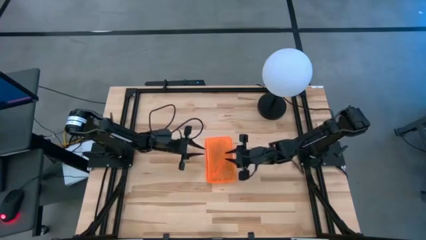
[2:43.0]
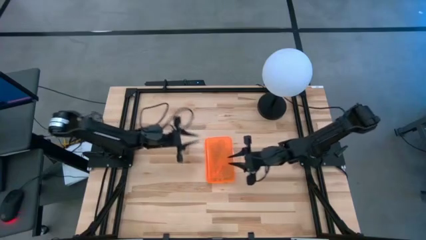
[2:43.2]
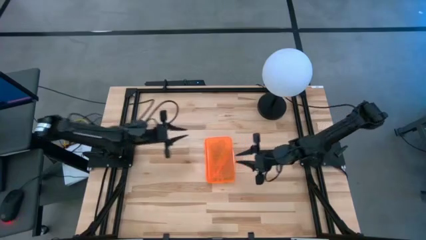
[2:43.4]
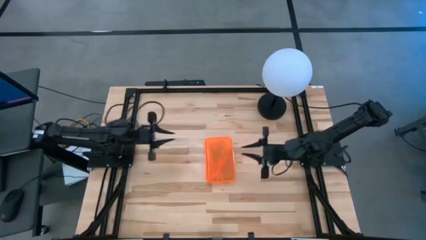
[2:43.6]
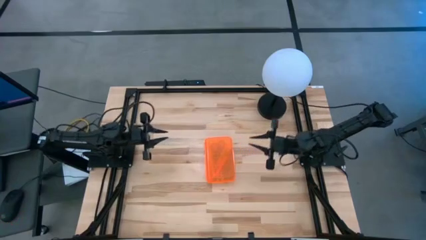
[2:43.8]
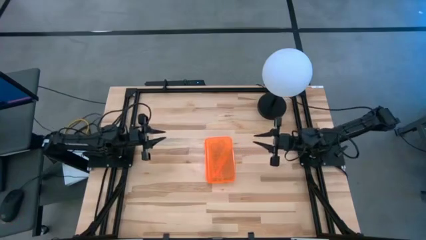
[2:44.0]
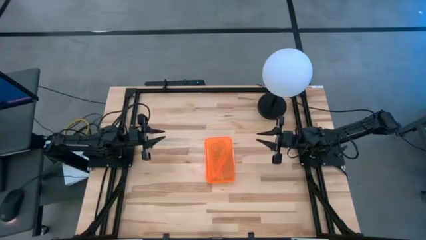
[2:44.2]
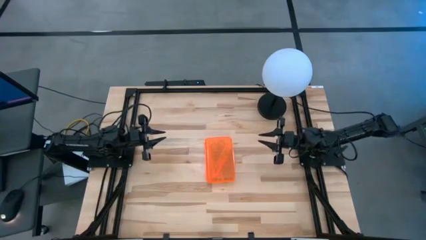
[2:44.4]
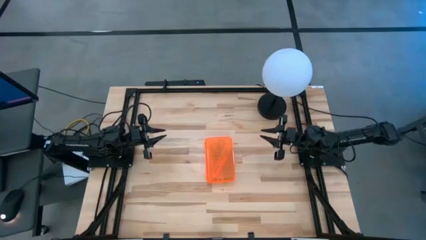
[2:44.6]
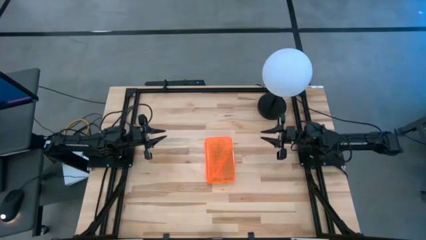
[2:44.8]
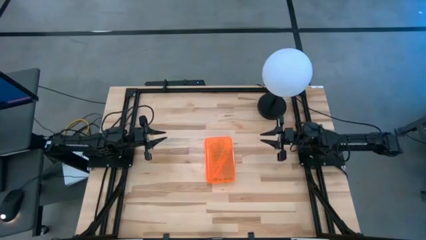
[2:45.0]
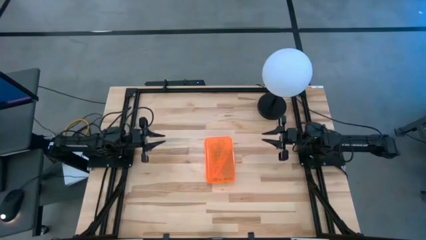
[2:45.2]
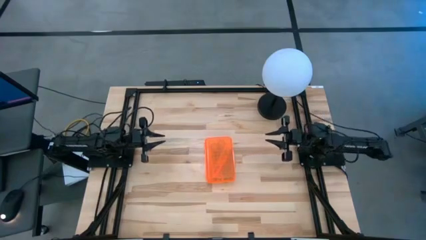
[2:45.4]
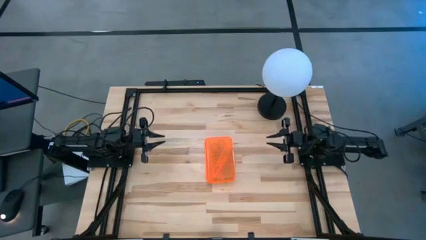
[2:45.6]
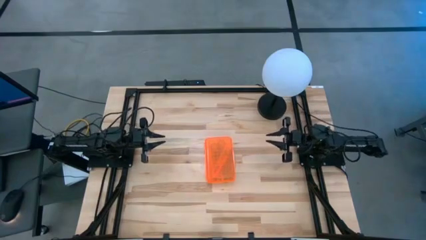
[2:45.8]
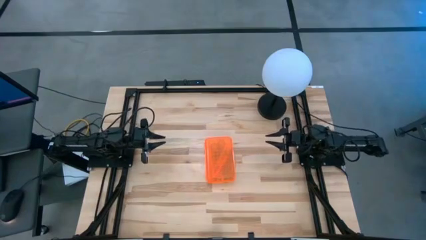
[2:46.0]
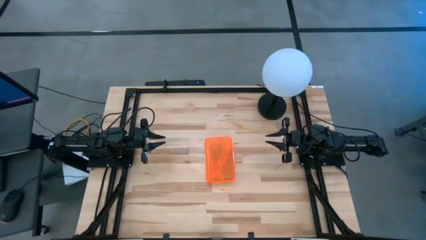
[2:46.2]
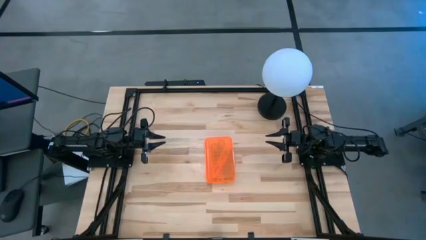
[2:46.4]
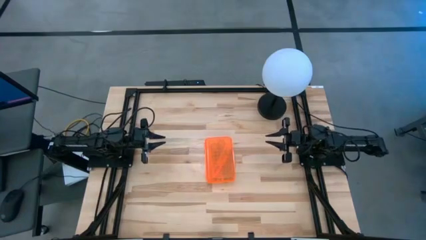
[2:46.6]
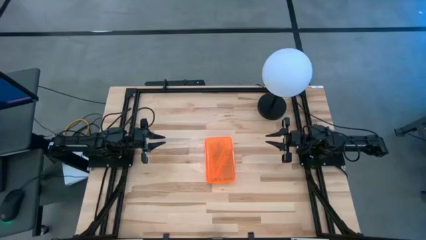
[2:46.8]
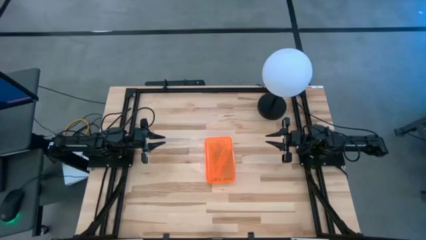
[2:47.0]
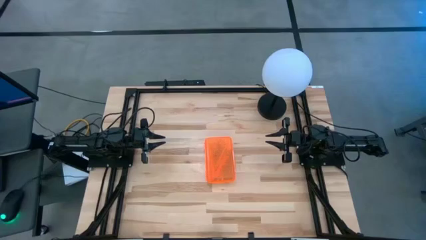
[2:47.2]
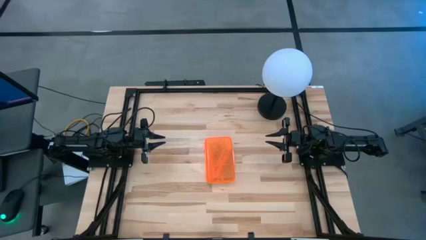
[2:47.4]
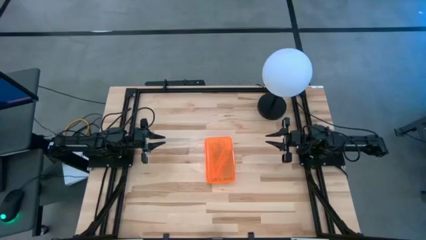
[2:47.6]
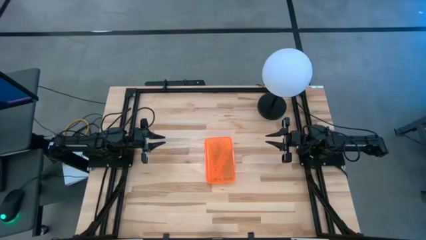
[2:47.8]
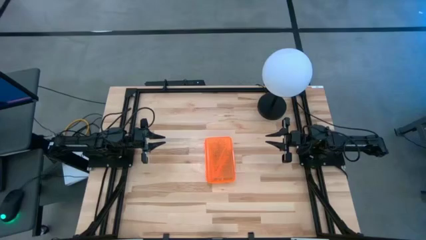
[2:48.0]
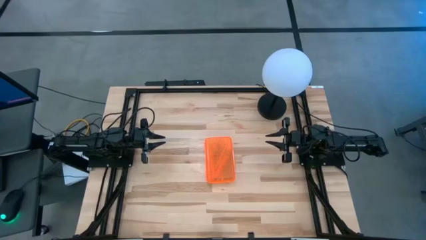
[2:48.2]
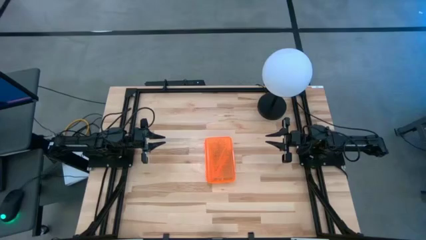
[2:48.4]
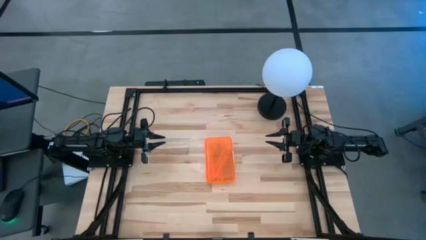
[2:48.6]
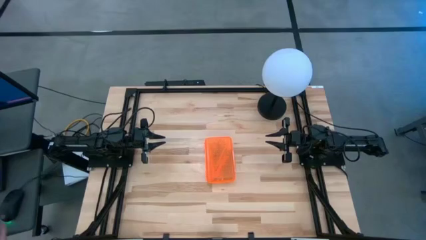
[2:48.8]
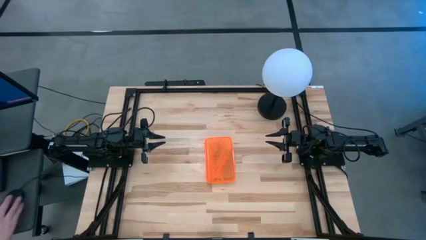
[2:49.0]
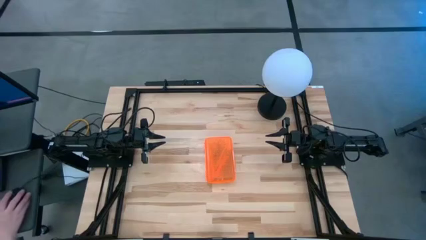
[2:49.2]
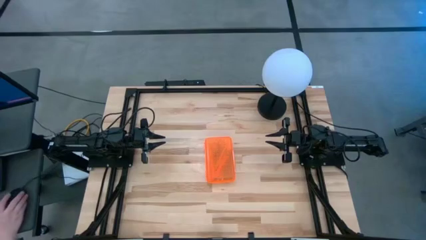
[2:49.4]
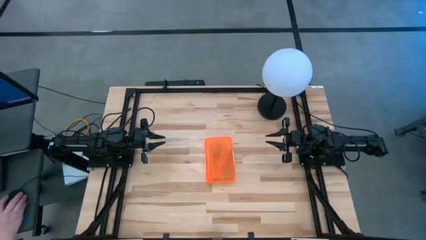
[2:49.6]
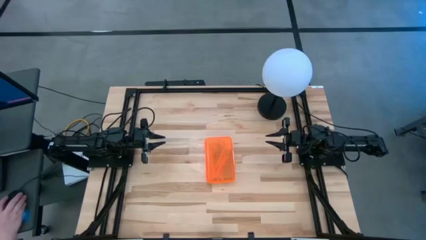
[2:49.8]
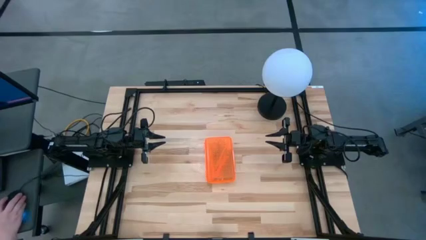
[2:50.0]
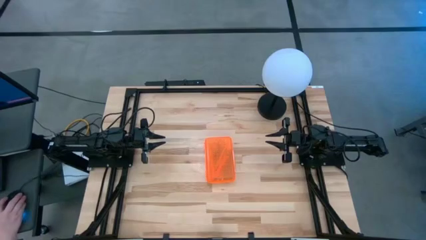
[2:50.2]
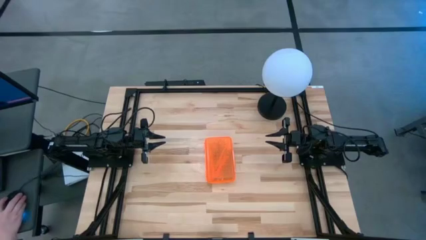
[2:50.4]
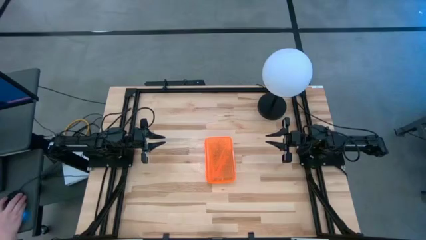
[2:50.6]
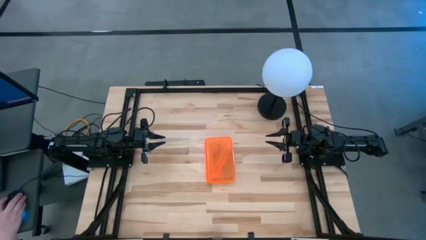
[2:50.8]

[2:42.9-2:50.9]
Task: Pick & place school supplies into a supply box
Return to Home Position

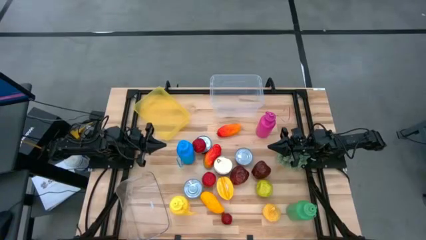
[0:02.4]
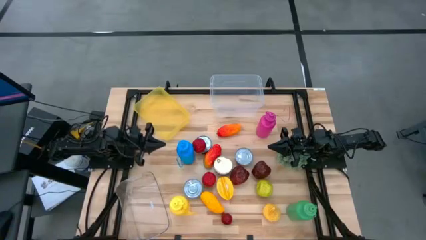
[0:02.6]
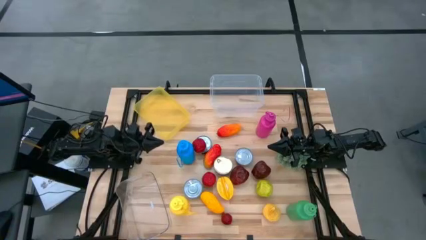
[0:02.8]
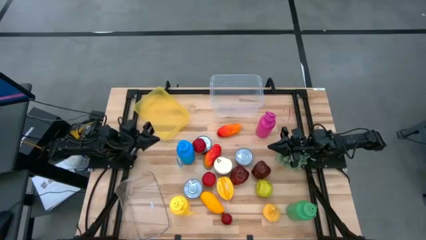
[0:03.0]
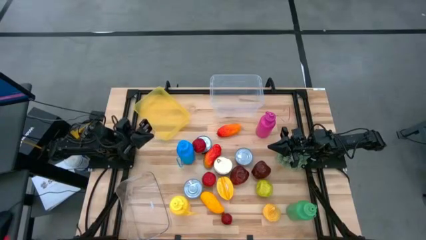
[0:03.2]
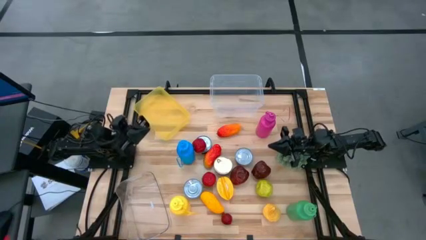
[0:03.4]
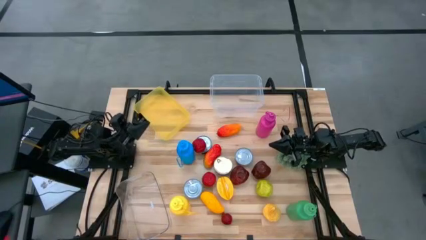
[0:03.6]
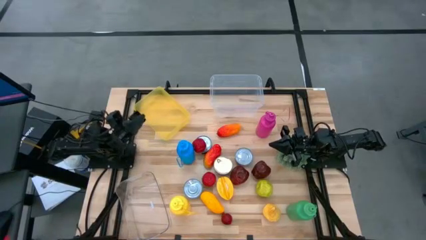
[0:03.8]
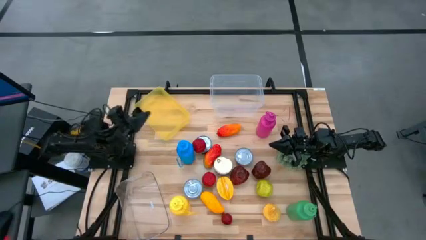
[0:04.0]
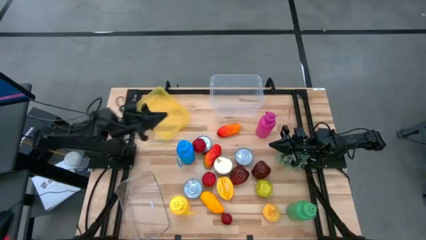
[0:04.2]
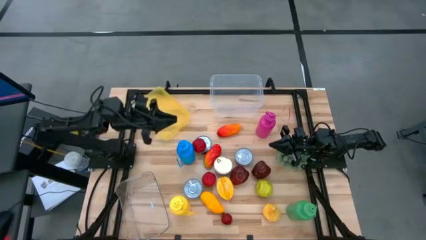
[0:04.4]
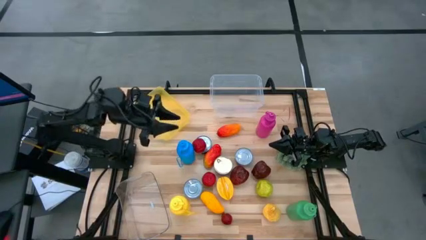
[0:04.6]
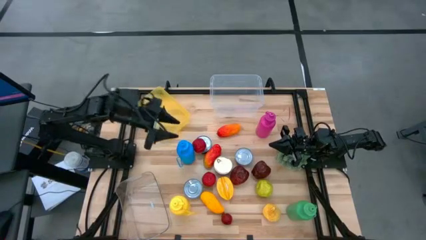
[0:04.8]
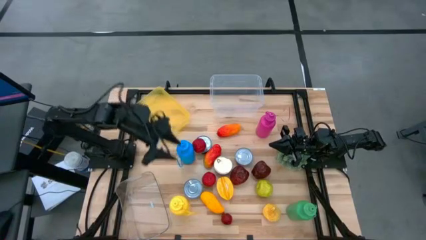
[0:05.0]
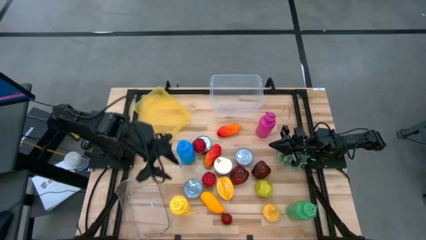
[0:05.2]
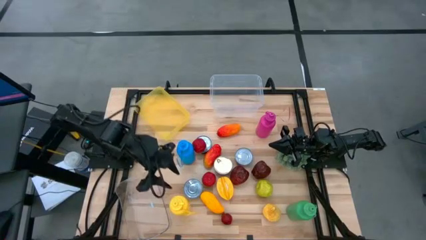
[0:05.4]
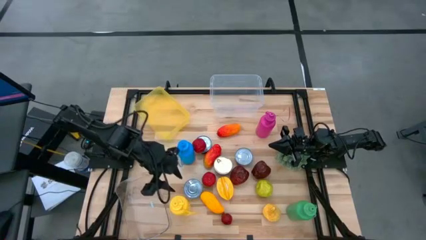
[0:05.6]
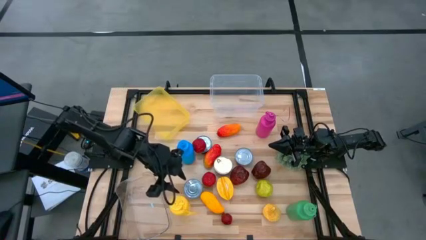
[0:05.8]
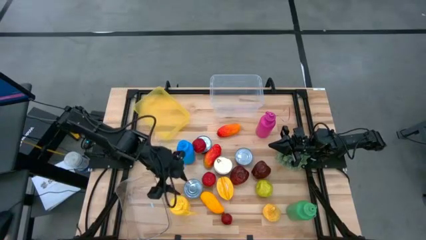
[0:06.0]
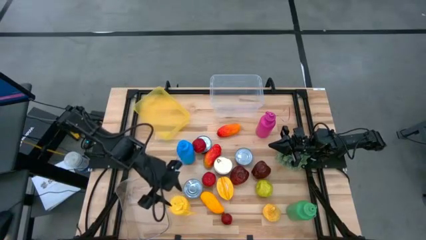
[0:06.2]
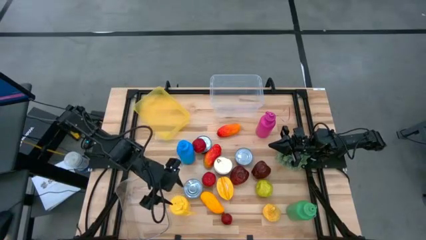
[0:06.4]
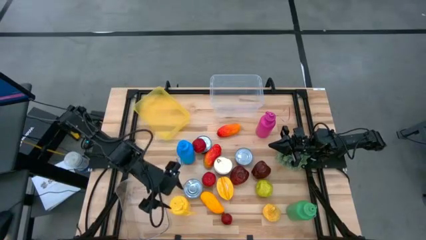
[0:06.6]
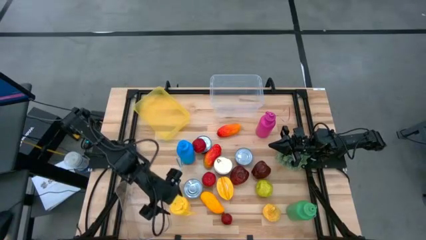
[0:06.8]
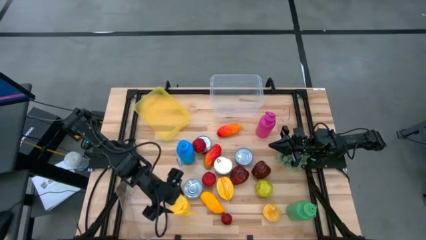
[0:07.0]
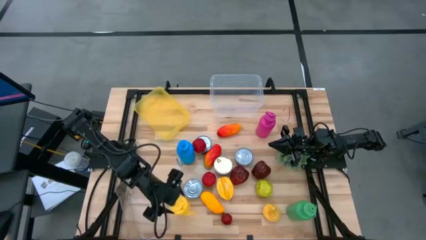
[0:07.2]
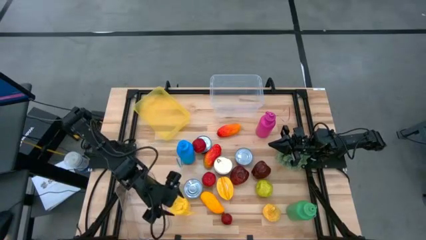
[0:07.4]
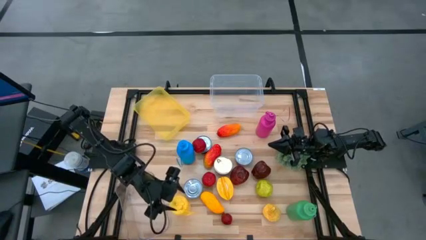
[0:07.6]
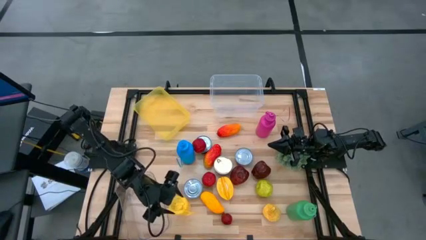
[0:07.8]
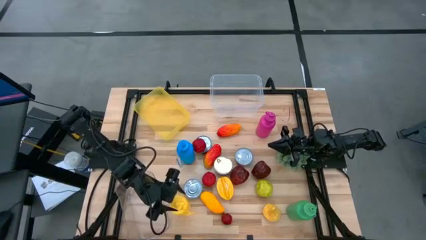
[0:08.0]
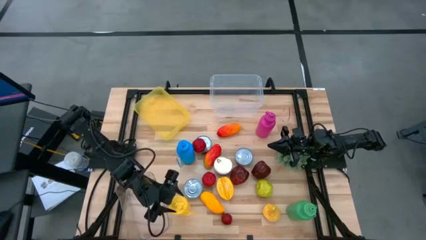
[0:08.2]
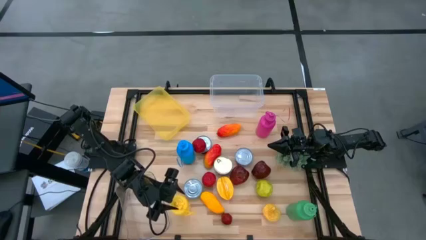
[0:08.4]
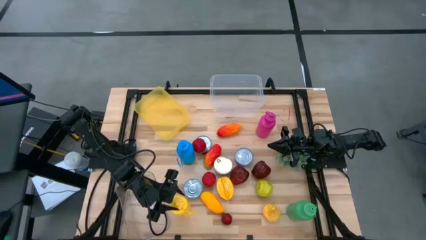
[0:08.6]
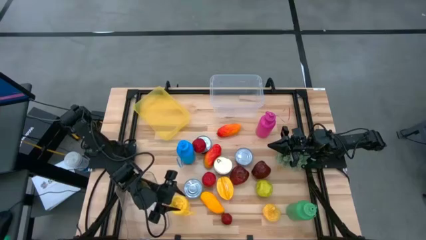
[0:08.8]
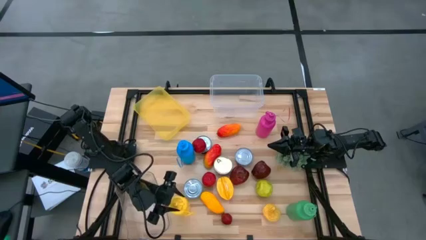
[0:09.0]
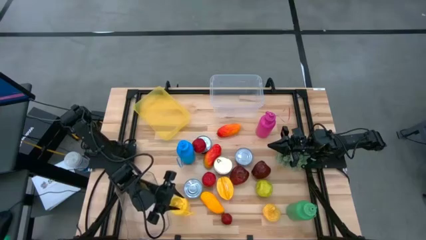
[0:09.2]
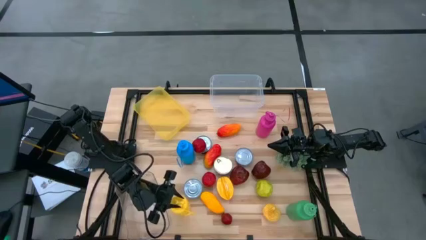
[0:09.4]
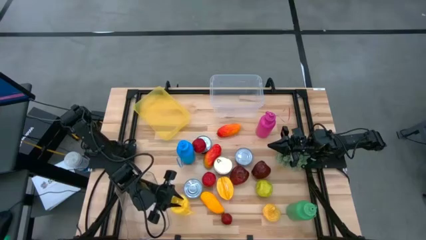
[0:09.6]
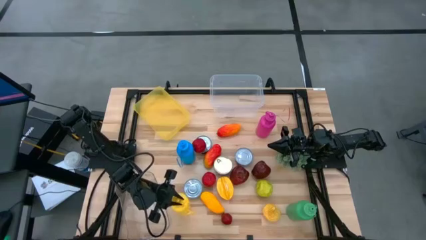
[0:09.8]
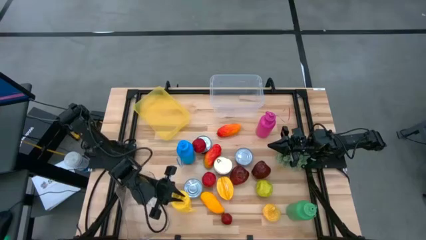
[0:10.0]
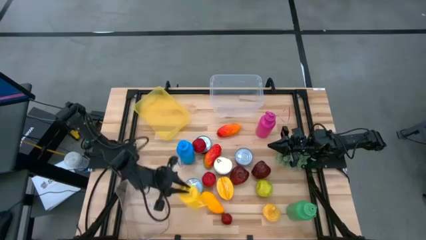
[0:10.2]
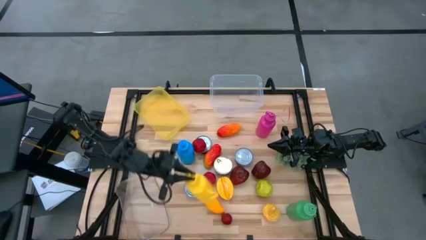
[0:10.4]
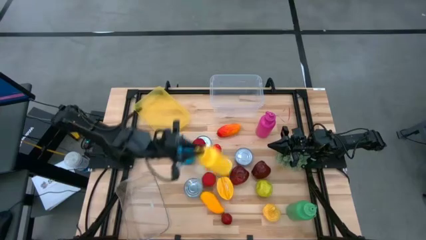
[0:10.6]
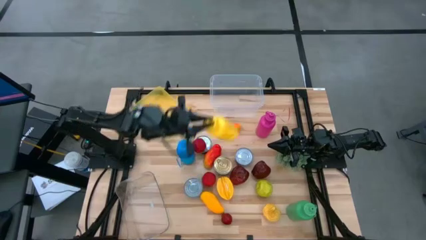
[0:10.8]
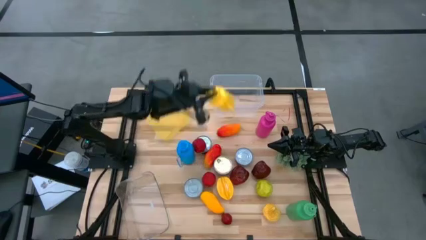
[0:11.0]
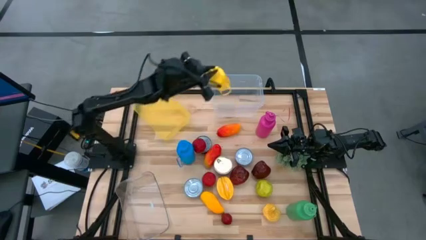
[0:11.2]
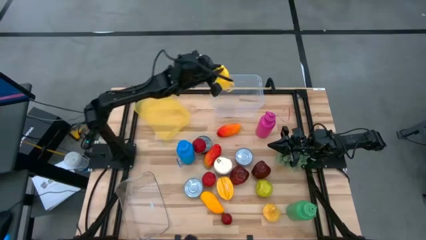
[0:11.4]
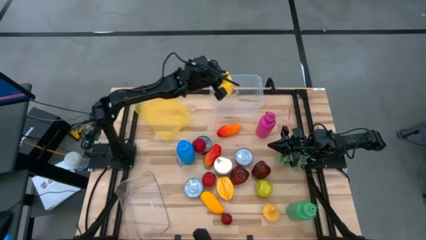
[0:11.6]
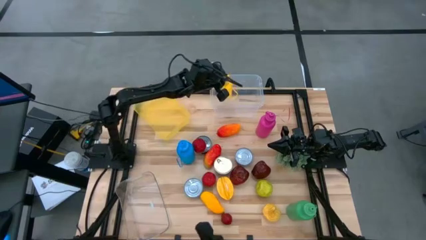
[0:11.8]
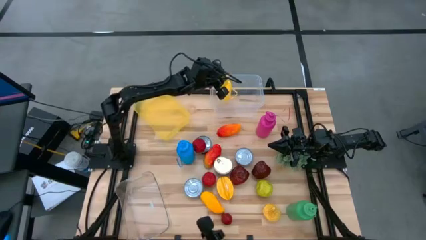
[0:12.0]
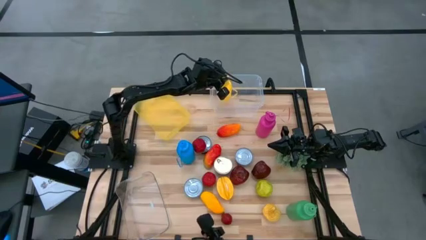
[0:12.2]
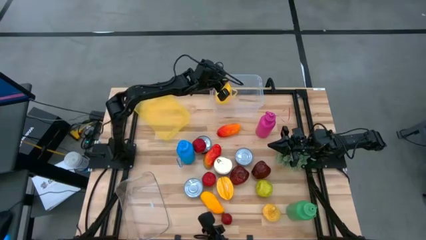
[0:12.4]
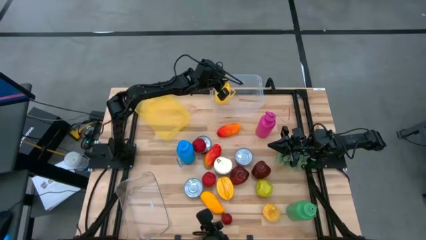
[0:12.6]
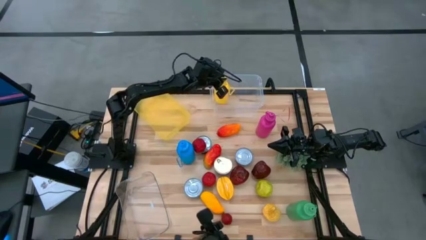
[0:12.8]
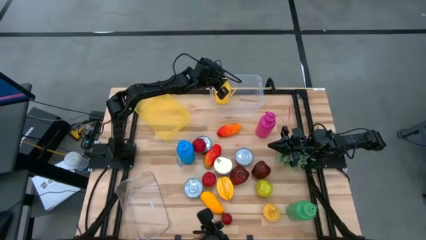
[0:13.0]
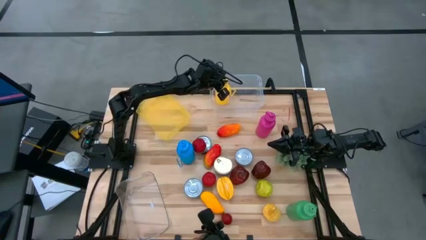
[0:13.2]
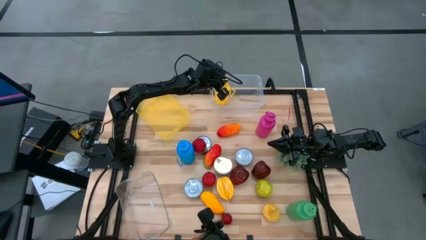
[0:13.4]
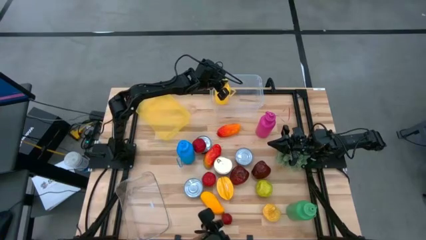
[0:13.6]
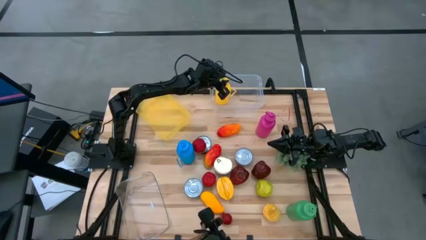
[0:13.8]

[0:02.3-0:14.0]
Task: Pick & Place Food Item
Put the yellow water bottle into the white transparent bin
